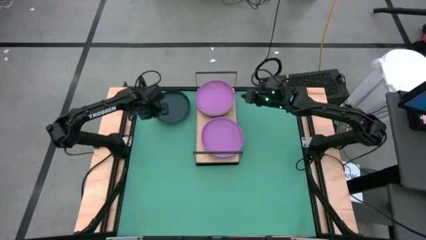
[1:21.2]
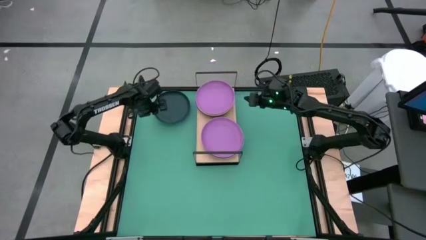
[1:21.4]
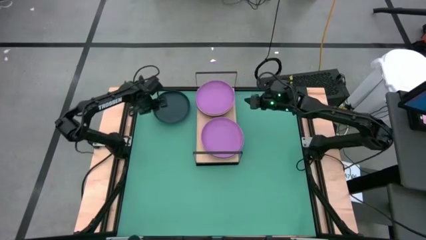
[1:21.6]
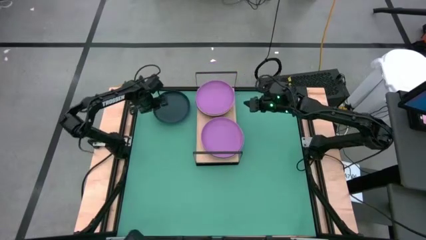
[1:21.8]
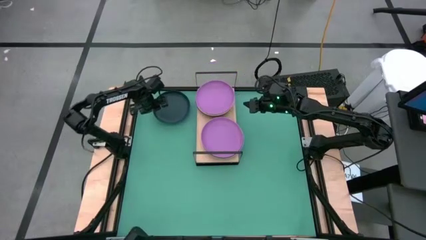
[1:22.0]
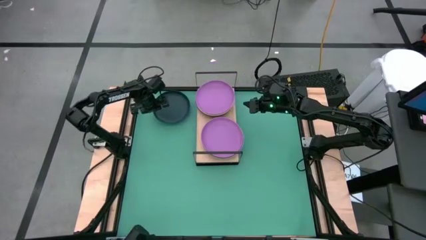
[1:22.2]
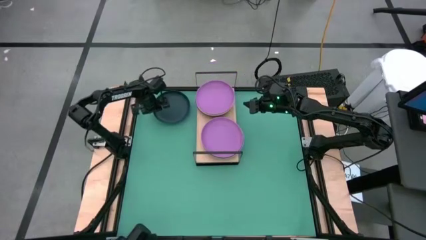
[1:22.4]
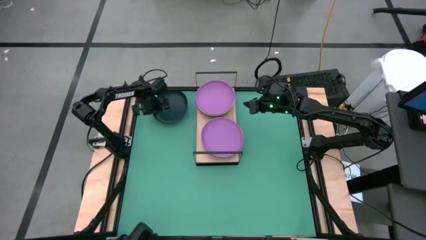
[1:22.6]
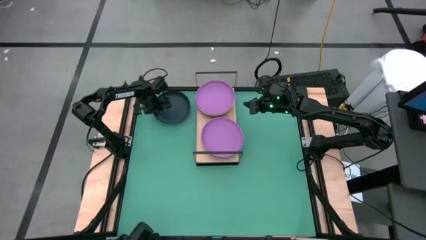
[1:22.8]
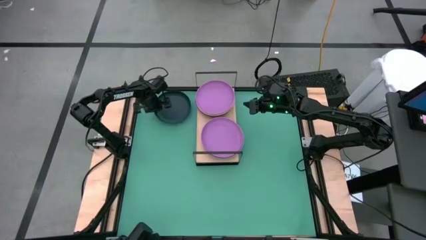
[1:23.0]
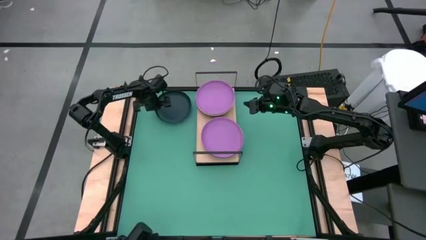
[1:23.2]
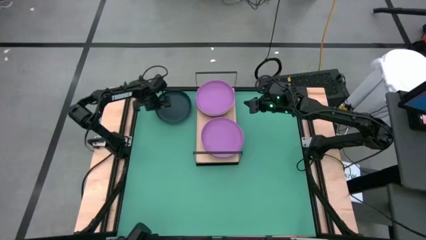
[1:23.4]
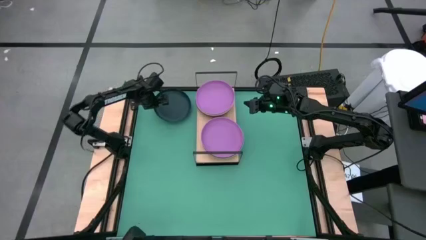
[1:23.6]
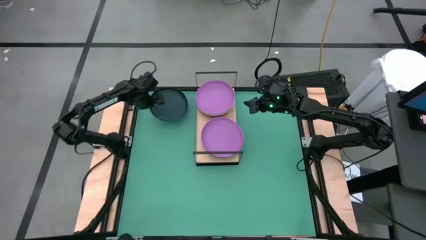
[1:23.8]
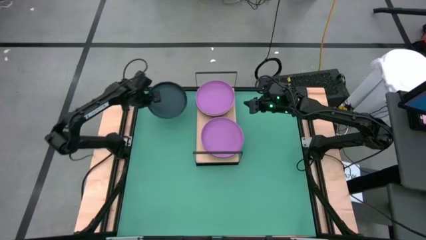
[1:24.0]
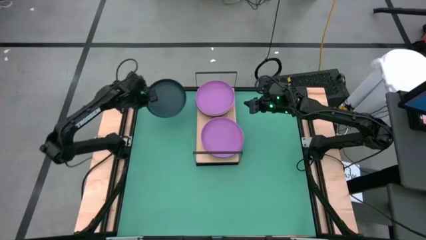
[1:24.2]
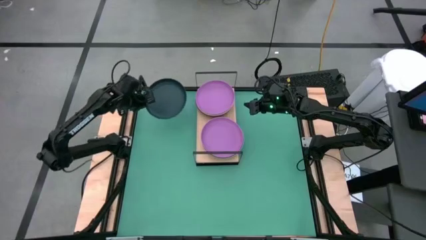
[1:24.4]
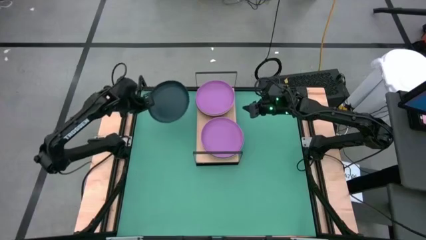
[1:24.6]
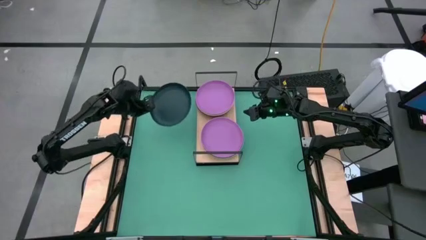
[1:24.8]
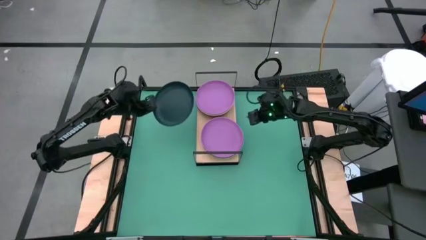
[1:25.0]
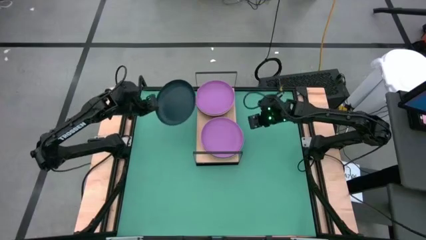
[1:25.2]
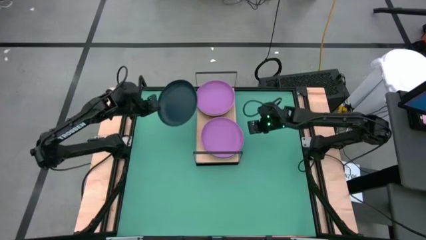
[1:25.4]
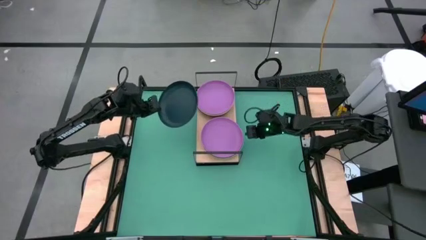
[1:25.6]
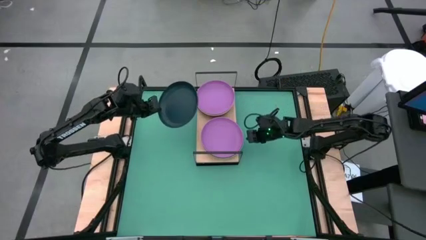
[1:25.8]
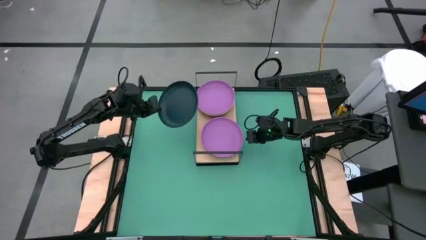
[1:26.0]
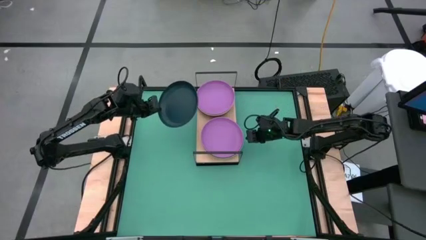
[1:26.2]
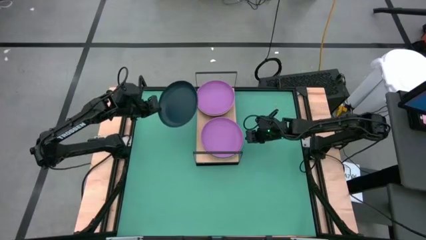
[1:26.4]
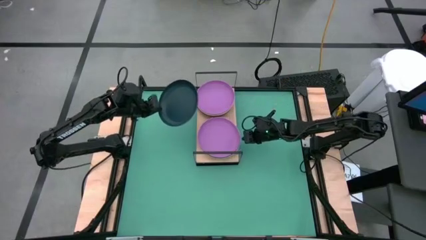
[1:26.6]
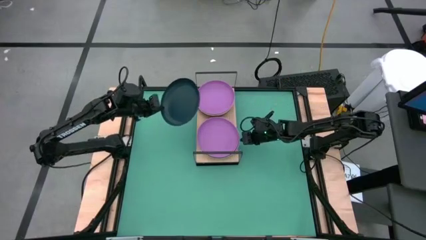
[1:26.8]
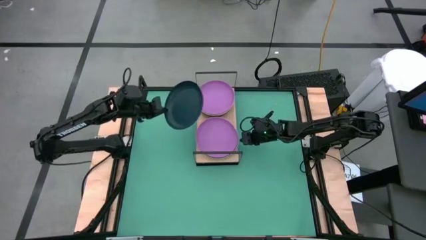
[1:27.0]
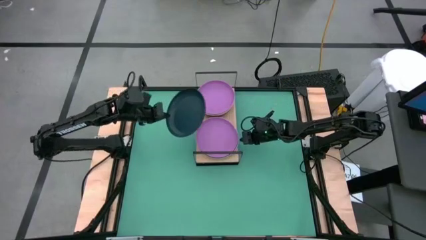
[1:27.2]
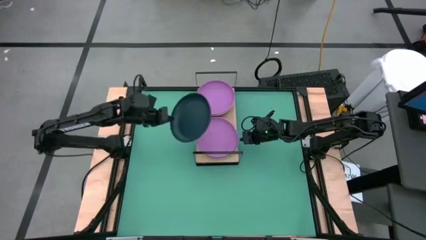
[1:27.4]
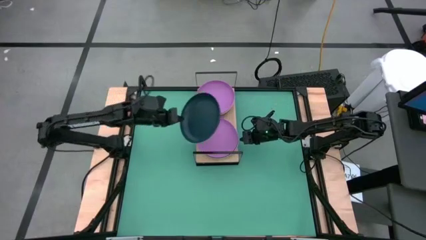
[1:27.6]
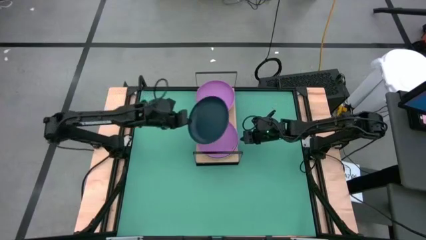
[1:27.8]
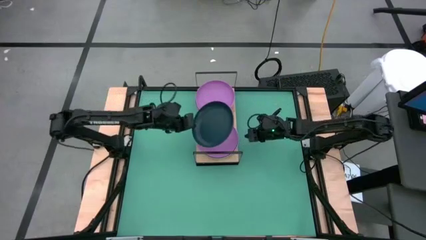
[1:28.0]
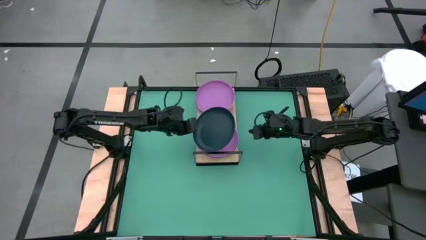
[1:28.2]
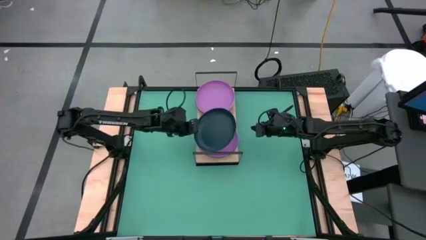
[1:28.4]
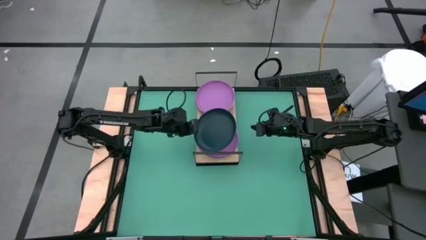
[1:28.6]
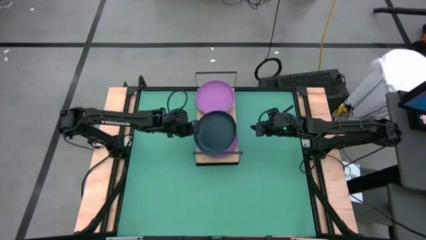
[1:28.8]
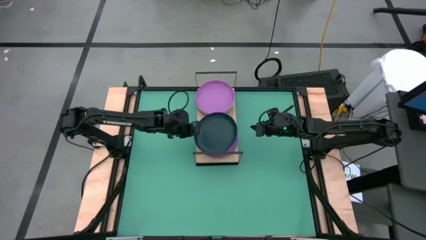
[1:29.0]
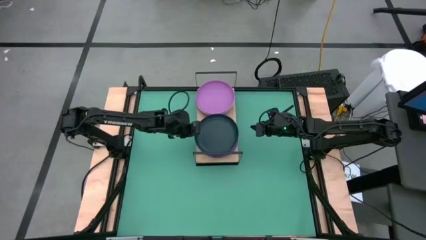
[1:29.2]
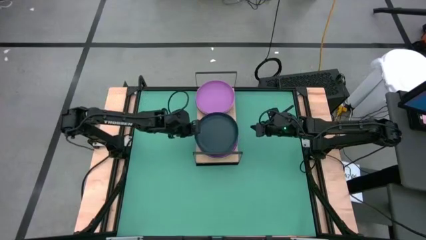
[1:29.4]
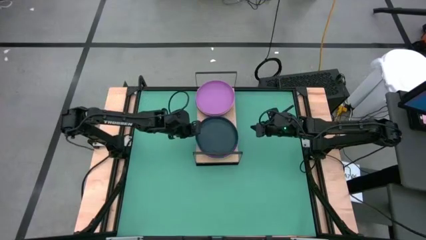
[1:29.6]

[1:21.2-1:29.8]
Task: Place and stack plates onto a shelf
Stack the black plate on top of the bottom purple plate on the shelf

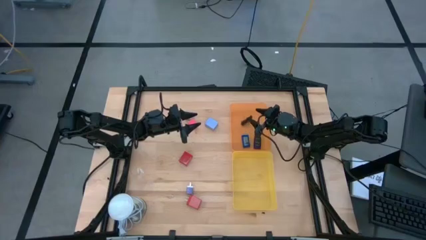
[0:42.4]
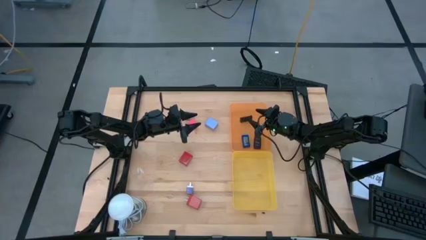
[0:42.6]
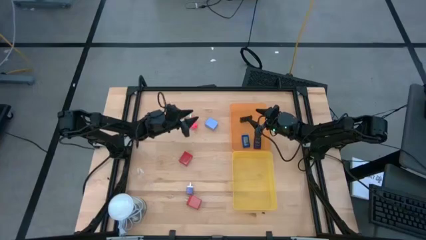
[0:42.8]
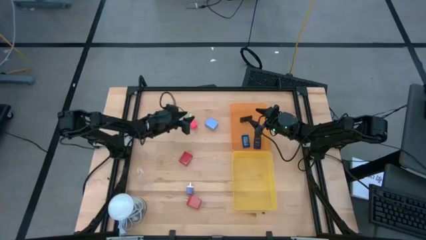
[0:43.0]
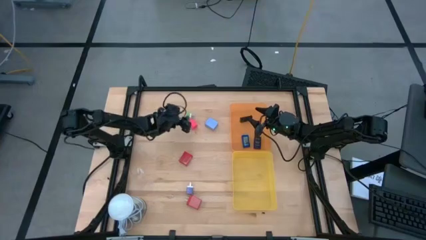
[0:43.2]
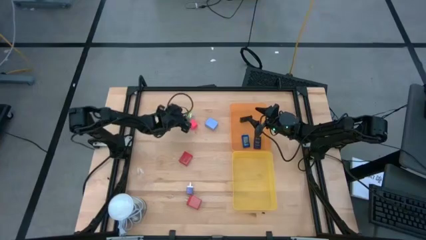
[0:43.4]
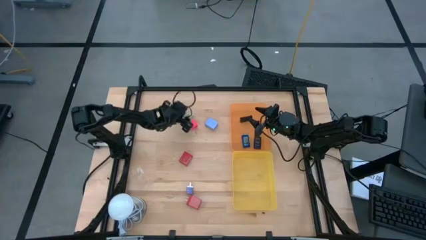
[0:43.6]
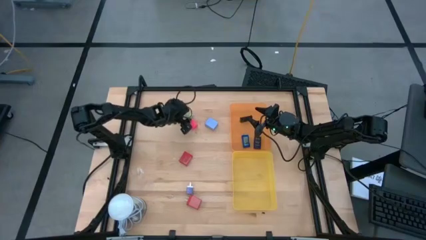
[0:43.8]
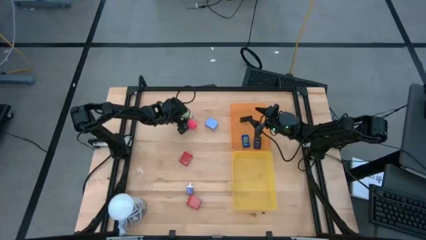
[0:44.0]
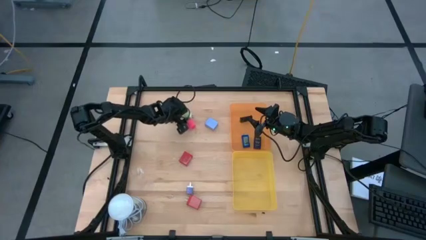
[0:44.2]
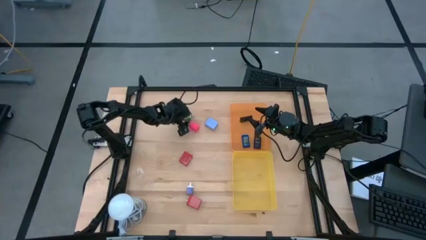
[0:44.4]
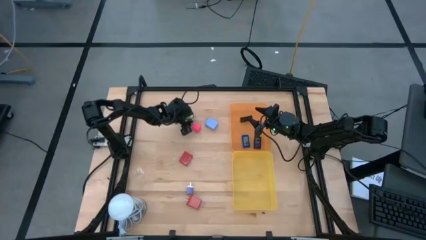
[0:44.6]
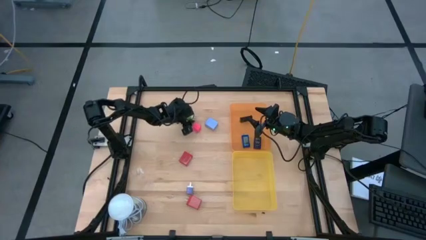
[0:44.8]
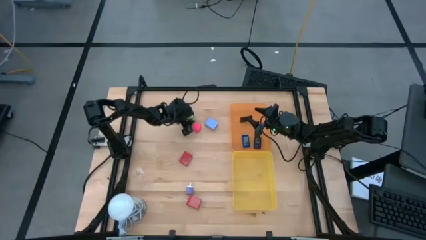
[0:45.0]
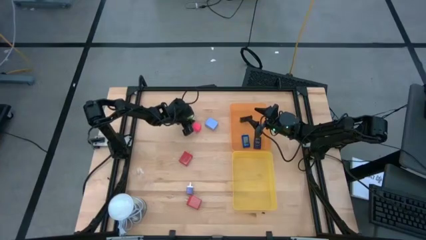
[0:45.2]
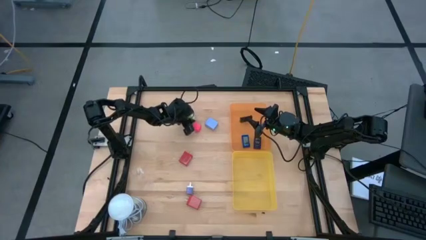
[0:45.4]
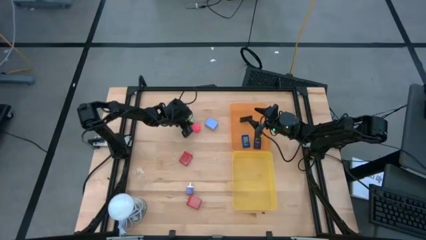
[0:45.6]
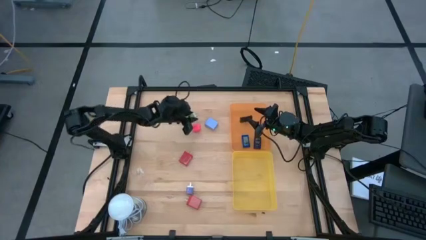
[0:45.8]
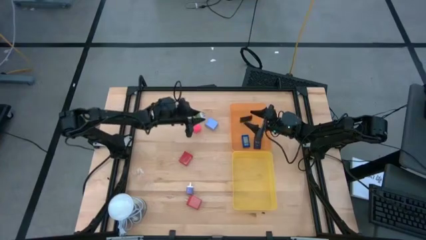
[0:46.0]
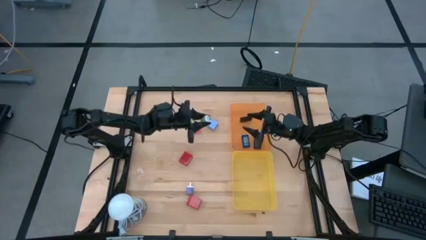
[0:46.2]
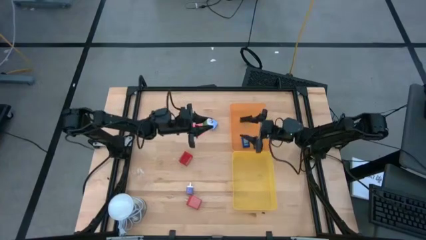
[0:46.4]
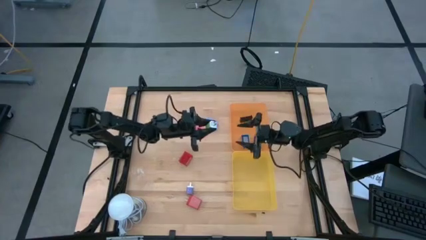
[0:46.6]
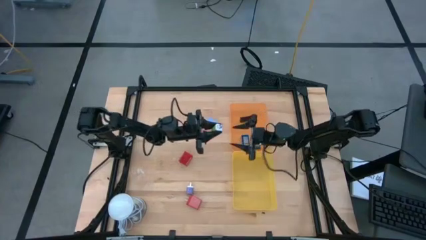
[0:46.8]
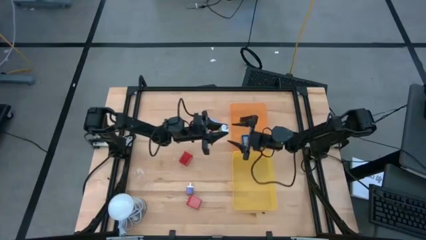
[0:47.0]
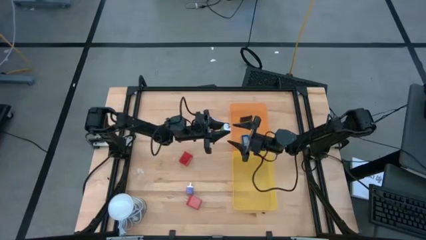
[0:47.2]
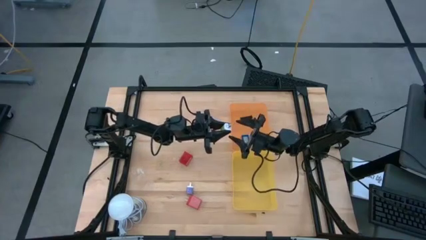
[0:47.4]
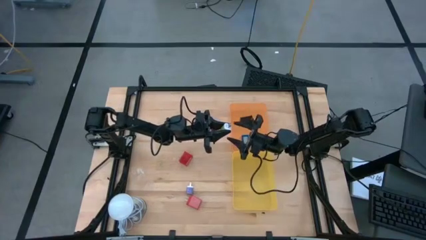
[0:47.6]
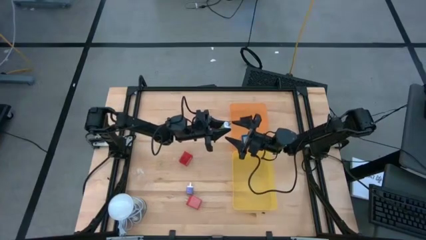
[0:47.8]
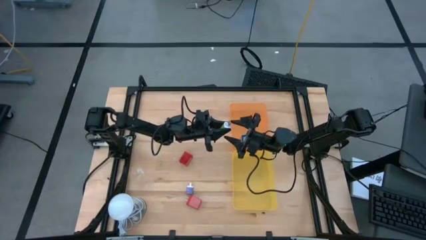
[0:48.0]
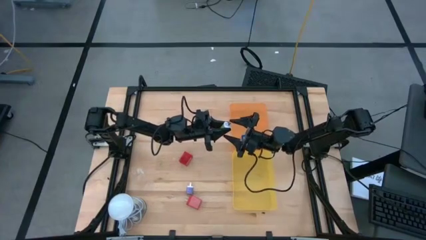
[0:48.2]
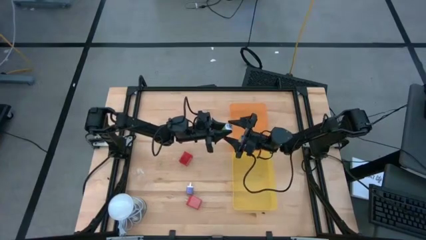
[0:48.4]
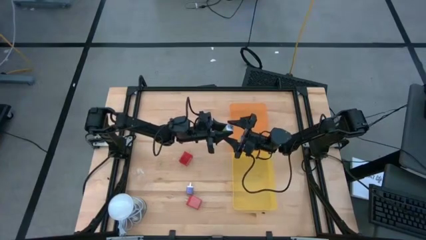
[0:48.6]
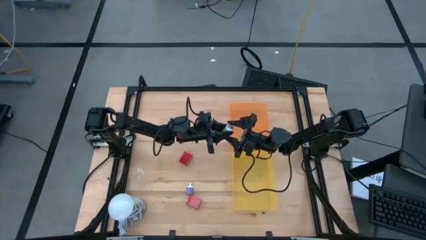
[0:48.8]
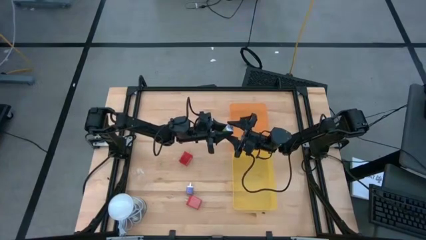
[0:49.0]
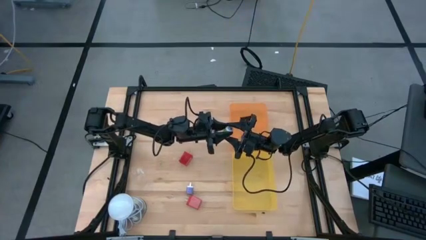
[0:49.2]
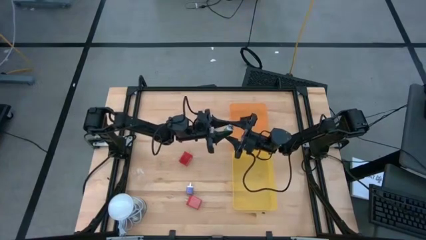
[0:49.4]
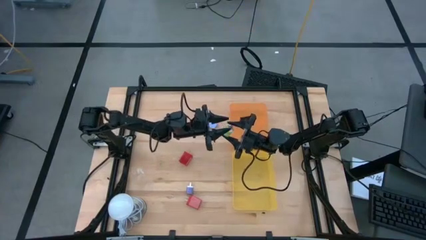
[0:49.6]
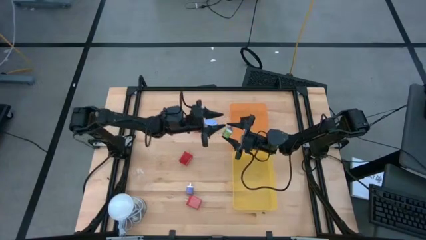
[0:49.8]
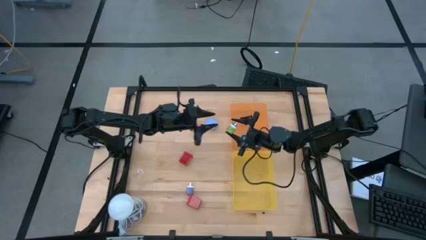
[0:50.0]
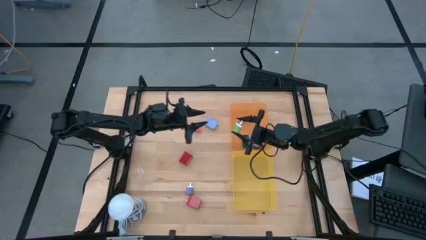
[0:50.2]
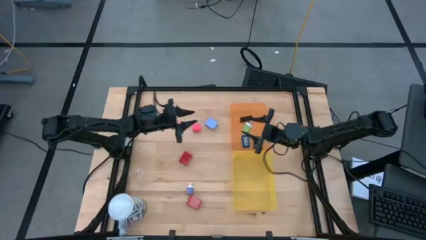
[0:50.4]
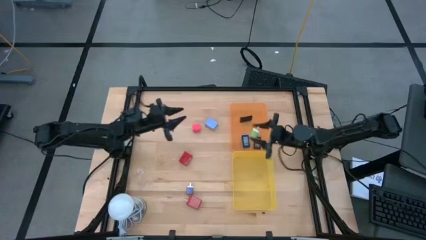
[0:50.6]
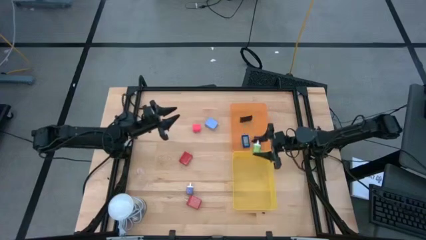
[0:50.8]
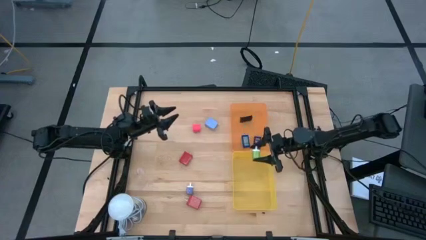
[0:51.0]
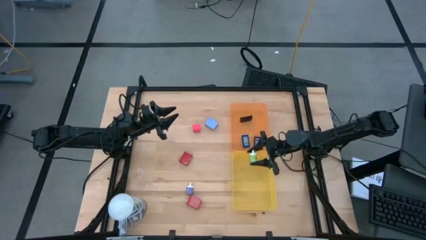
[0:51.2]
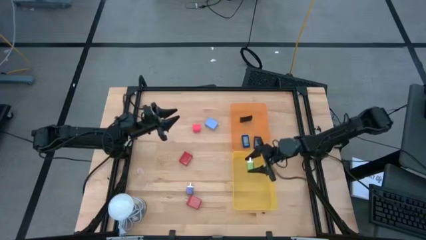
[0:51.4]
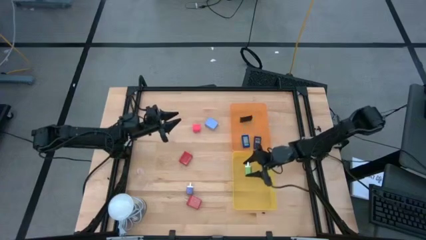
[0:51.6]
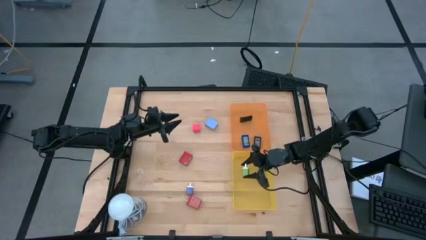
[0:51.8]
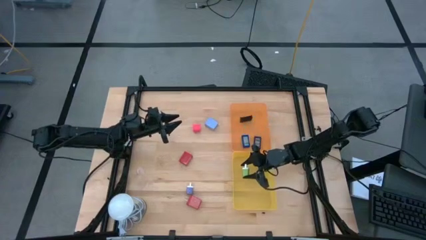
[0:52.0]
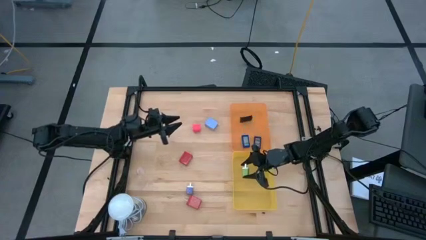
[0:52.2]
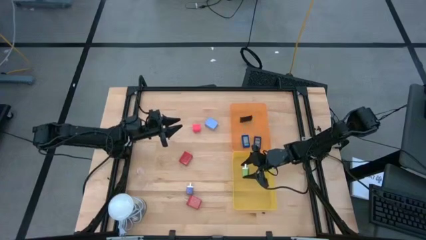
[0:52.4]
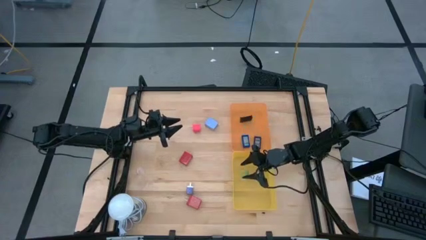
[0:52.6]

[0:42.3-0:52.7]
Task: Pick & Place Office items
Put the green charger adapter into the yellow bin
